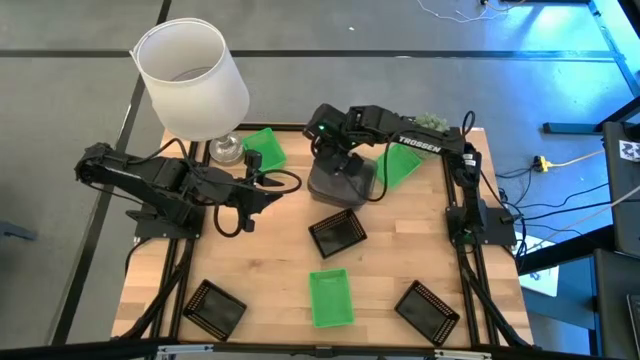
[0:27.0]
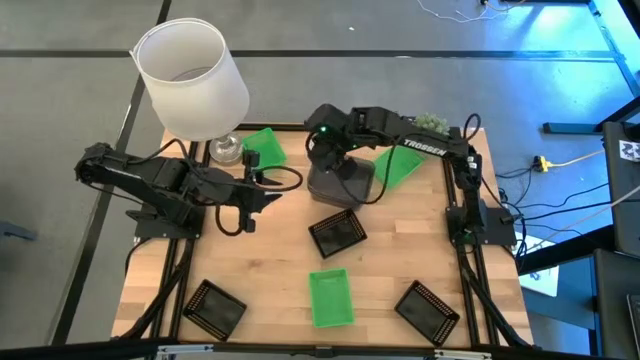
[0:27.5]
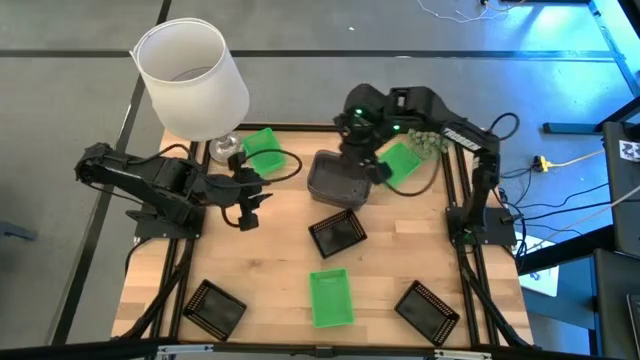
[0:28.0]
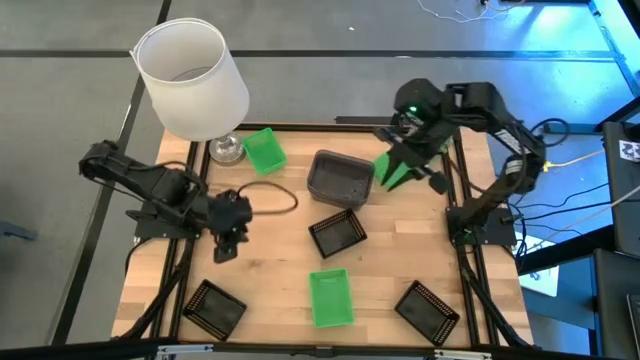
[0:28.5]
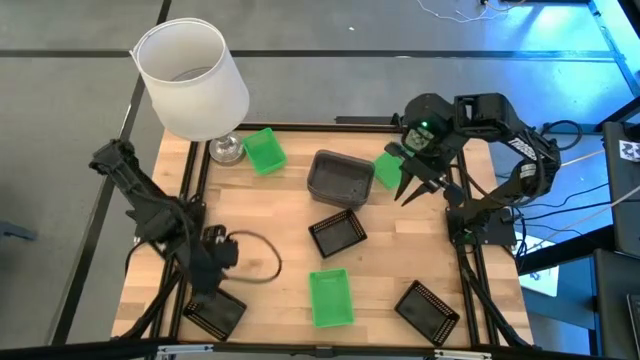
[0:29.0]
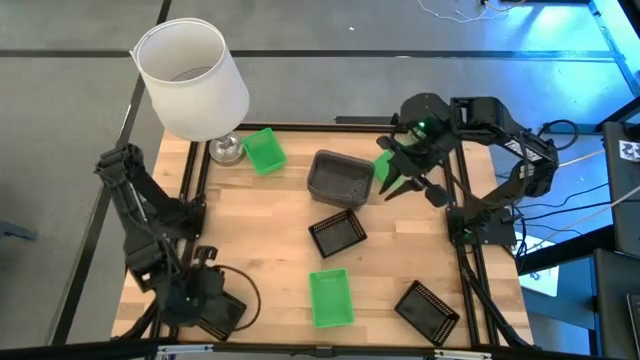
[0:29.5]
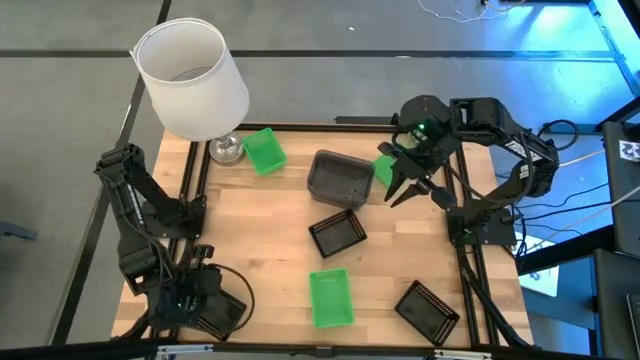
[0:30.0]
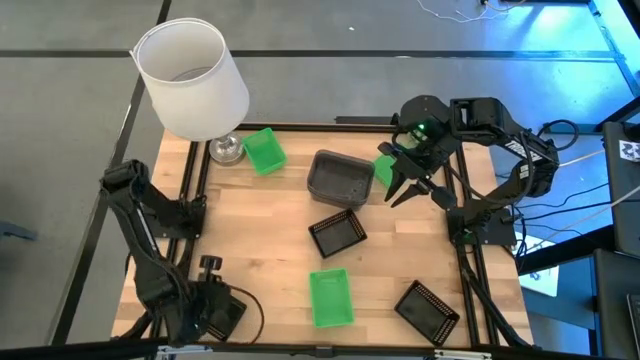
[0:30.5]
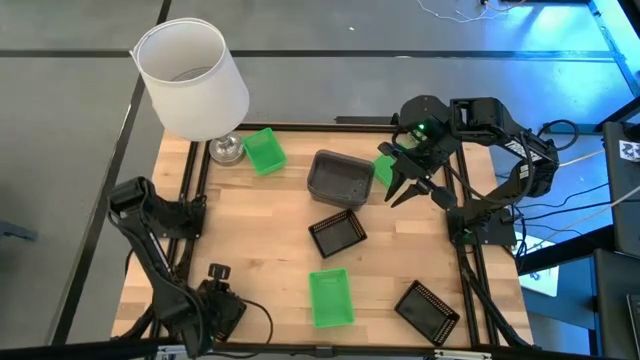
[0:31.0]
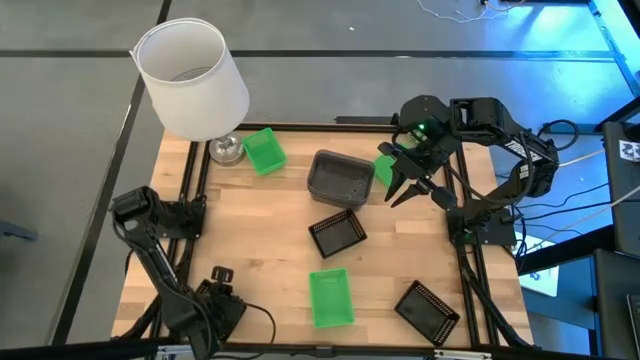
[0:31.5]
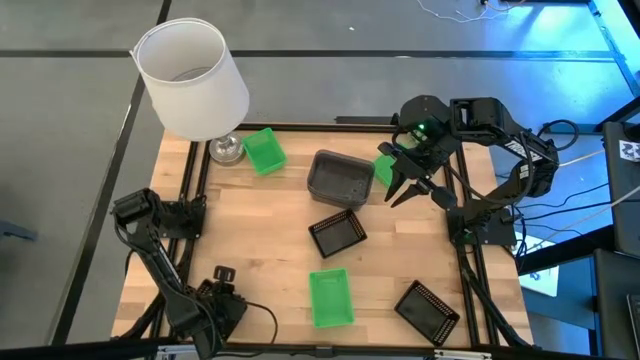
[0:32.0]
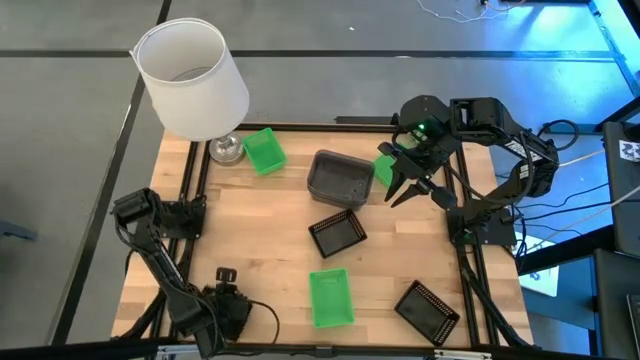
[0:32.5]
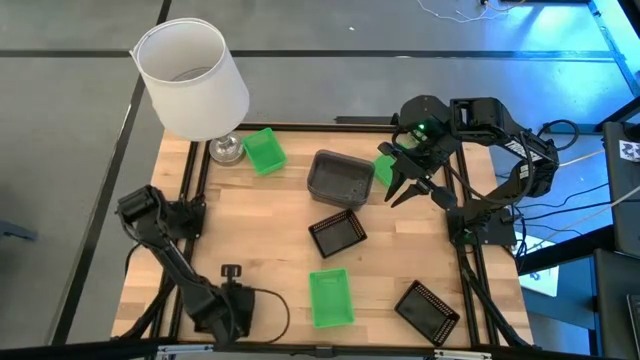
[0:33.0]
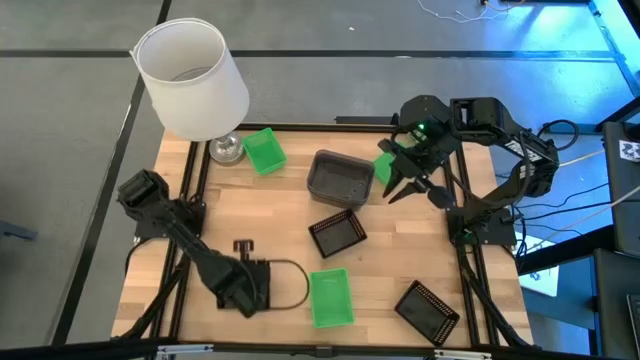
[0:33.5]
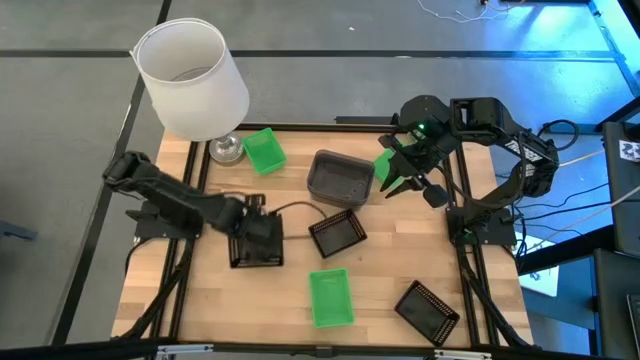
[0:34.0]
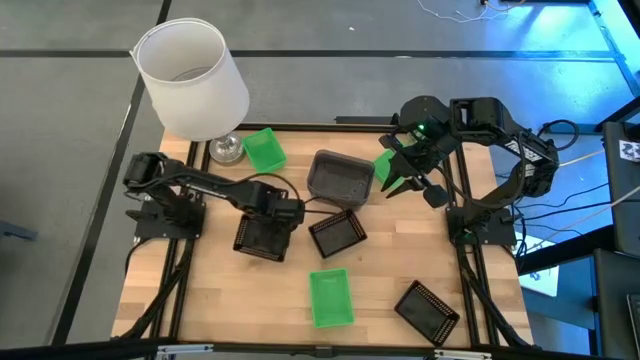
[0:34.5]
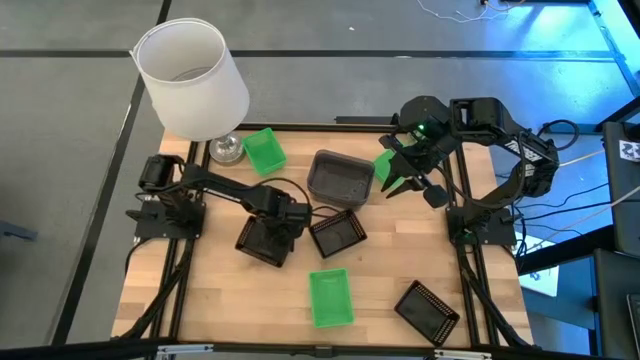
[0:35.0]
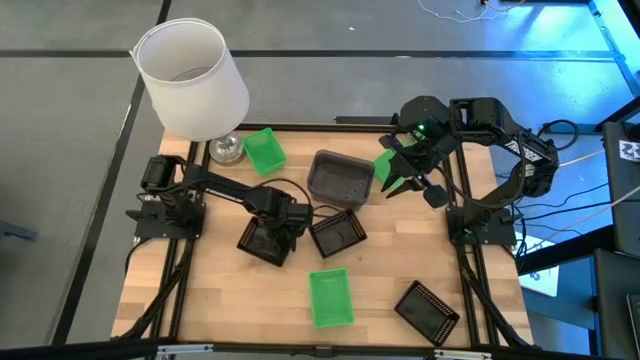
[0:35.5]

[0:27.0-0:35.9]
Move the left black basket to the left side of the table

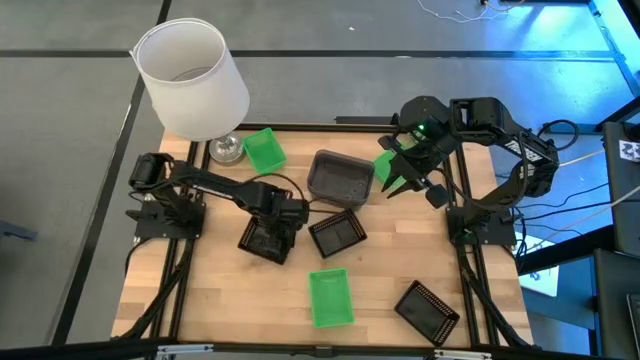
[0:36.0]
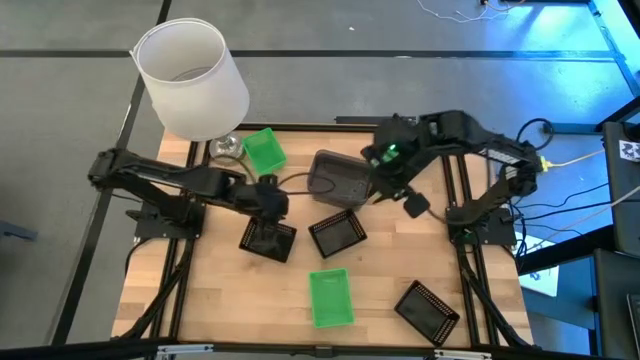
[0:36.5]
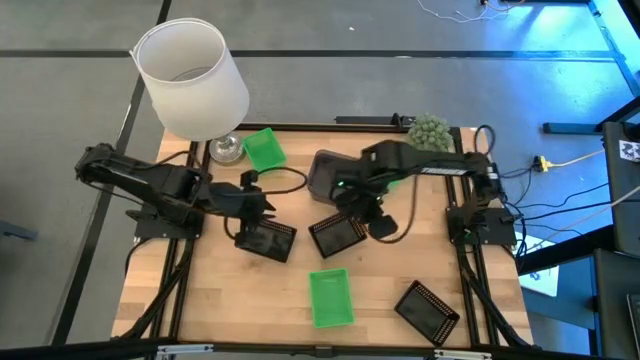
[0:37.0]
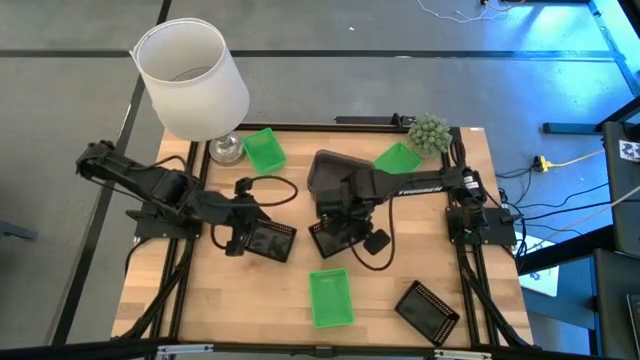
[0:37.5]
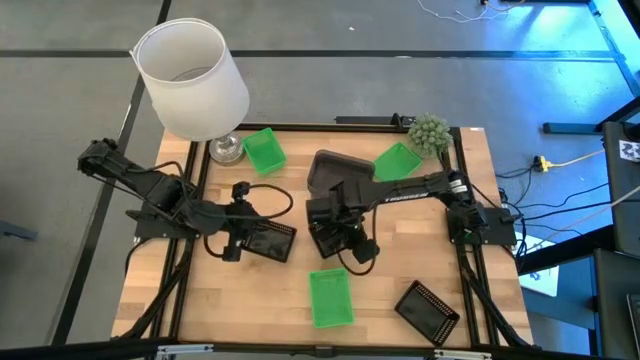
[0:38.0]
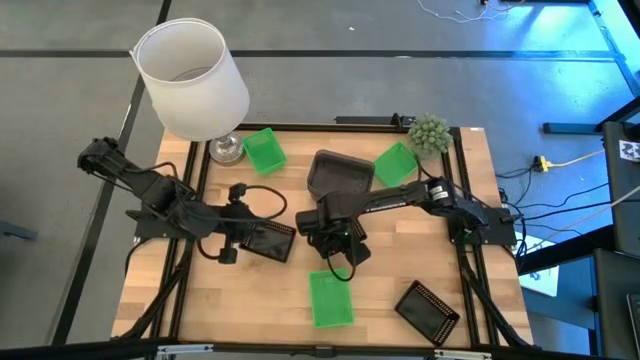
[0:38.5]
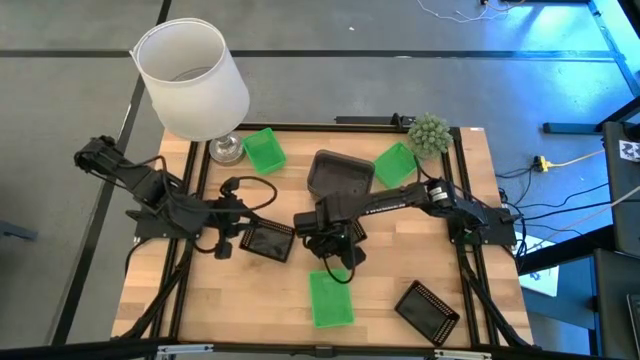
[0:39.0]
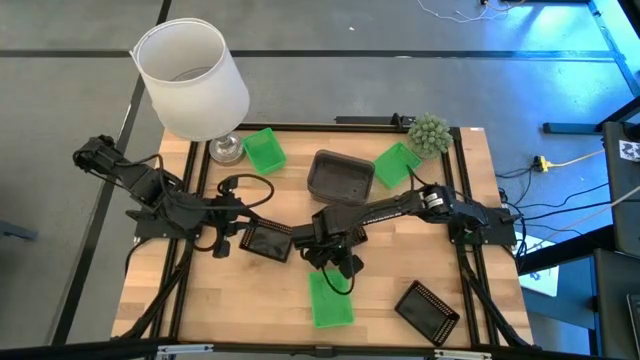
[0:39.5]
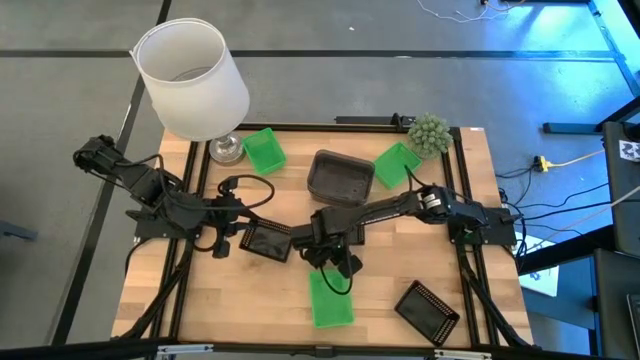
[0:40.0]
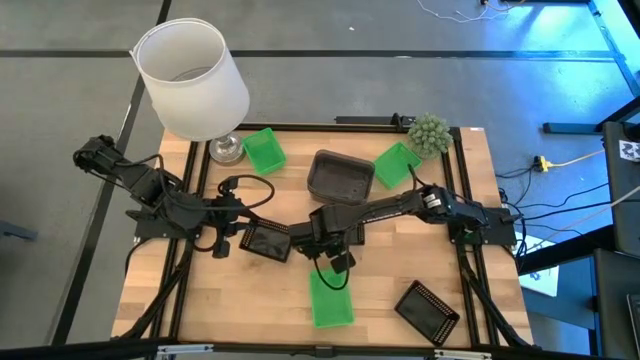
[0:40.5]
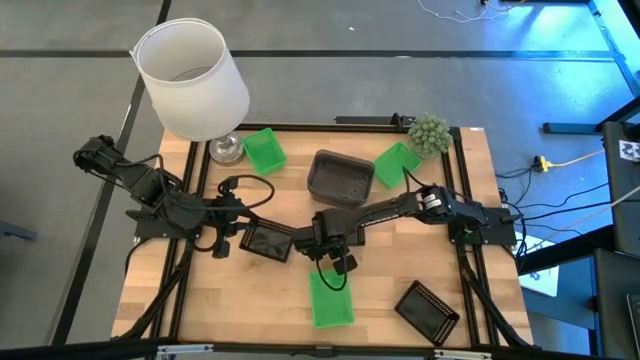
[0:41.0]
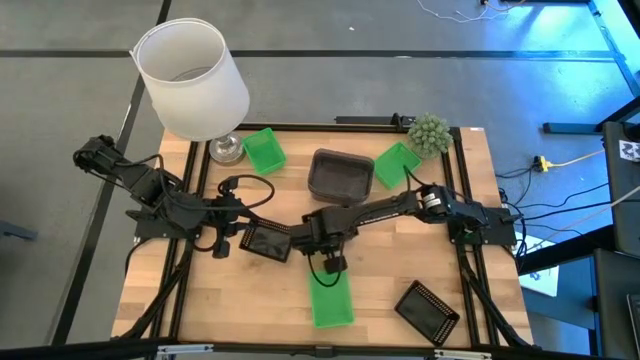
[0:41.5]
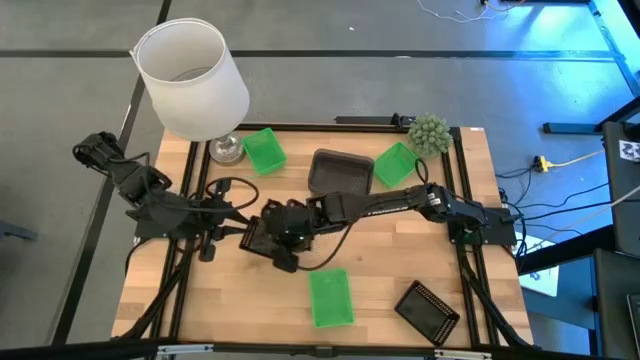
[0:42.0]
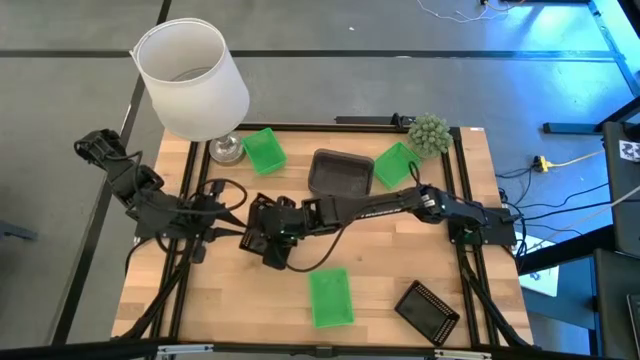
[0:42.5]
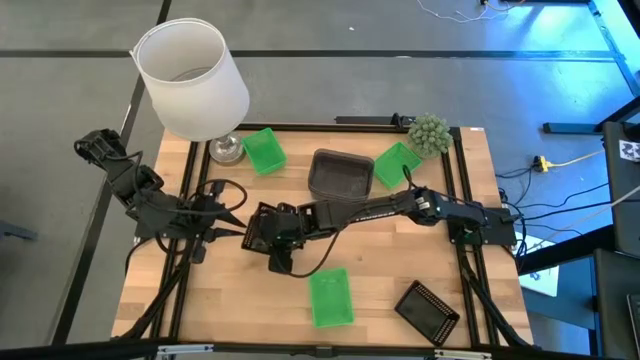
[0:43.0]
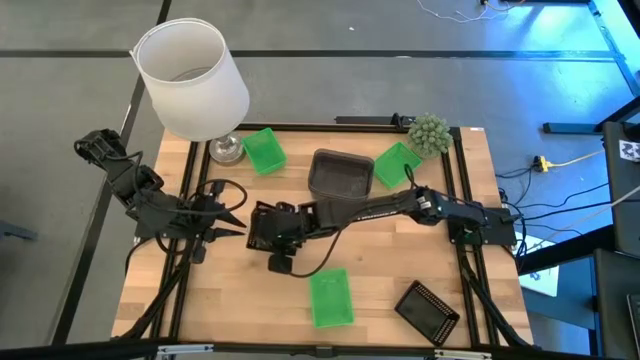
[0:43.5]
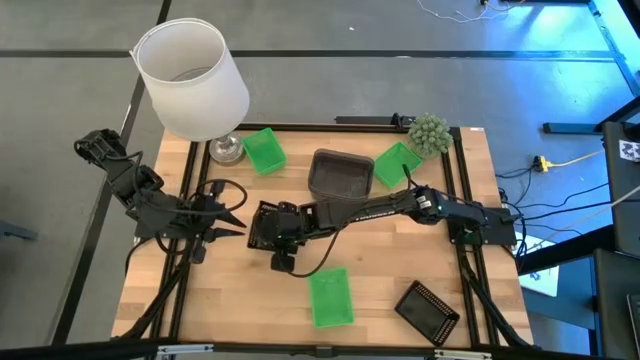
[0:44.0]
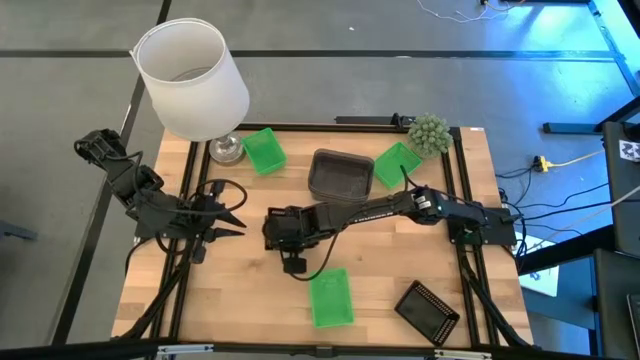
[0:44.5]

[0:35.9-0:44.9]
Stack the middle black basket on top of the left black basket
